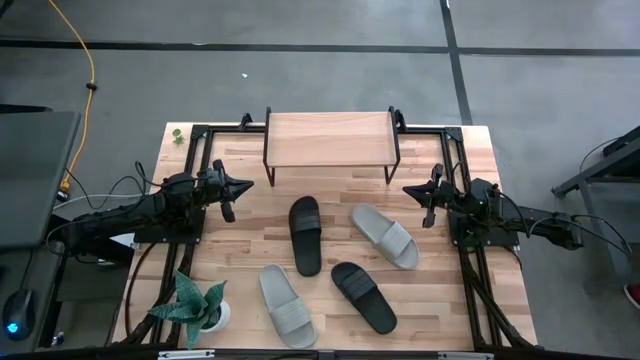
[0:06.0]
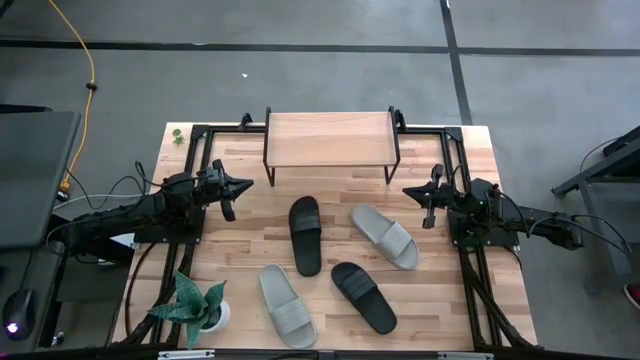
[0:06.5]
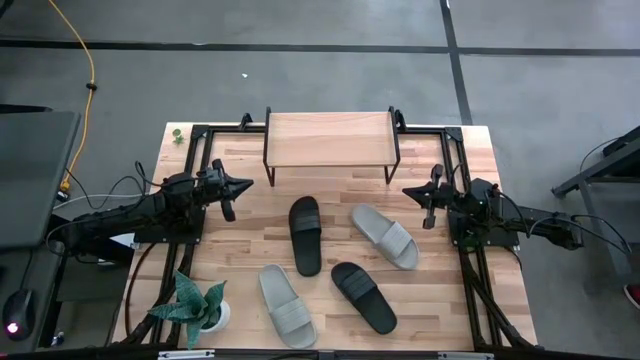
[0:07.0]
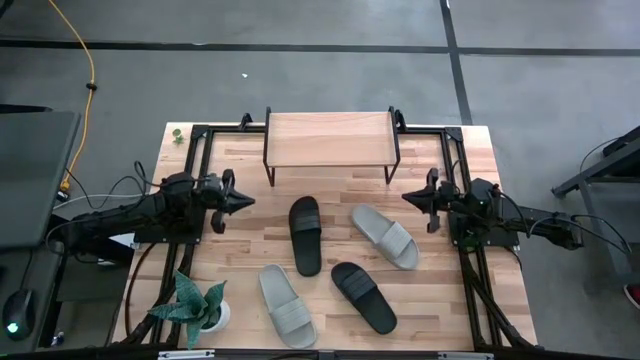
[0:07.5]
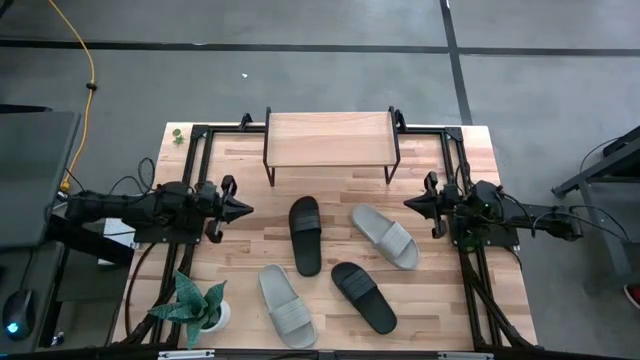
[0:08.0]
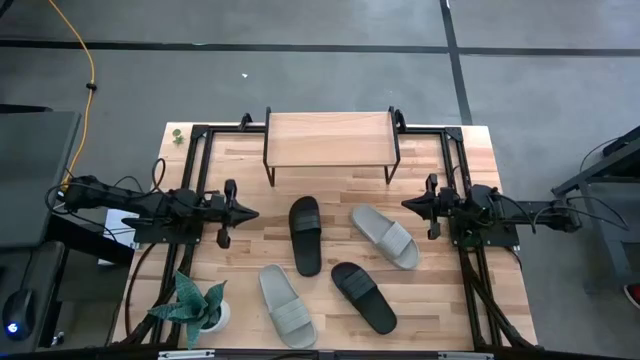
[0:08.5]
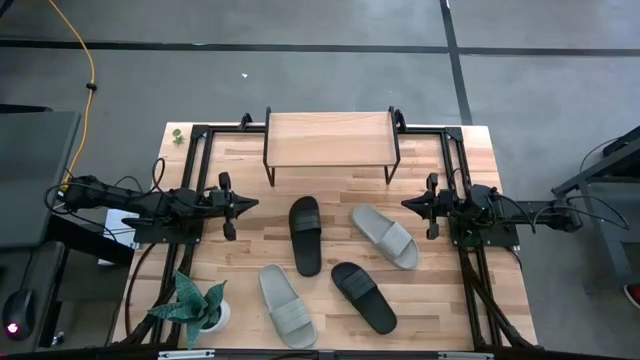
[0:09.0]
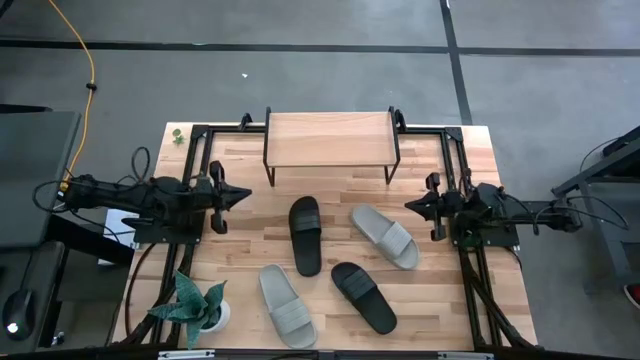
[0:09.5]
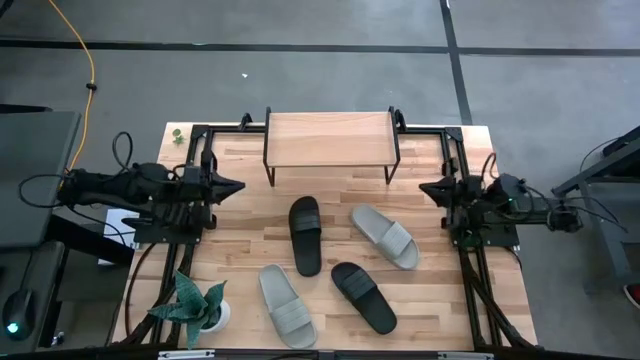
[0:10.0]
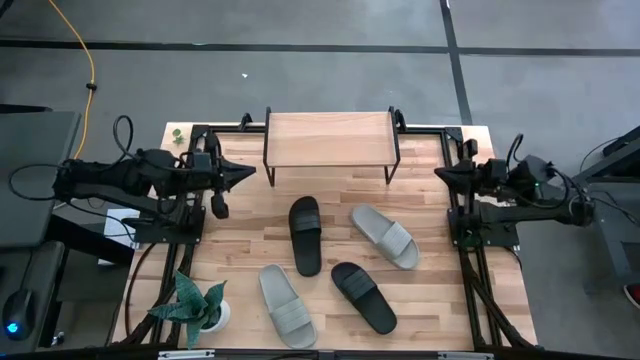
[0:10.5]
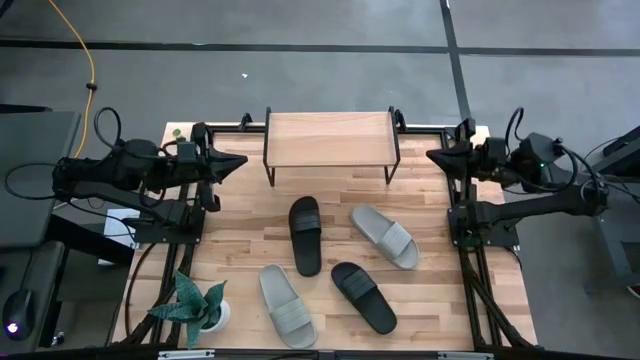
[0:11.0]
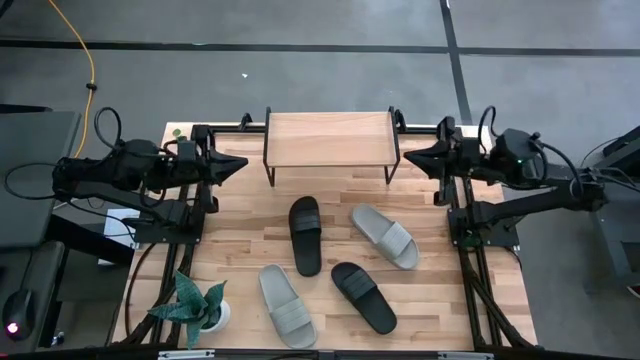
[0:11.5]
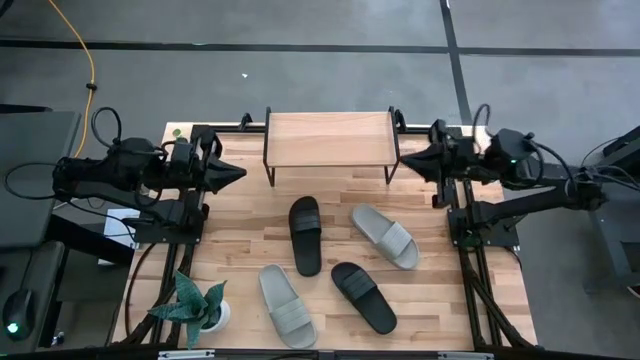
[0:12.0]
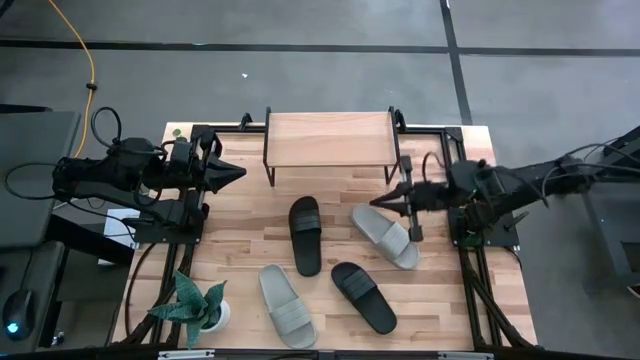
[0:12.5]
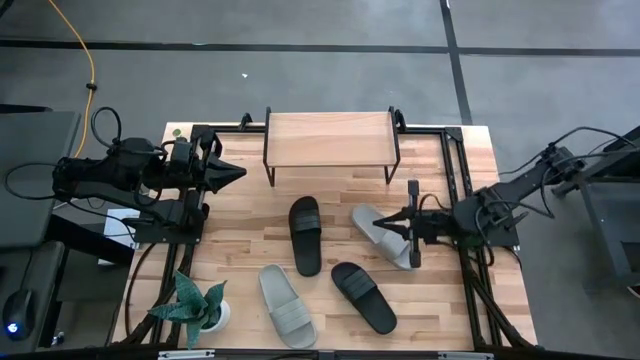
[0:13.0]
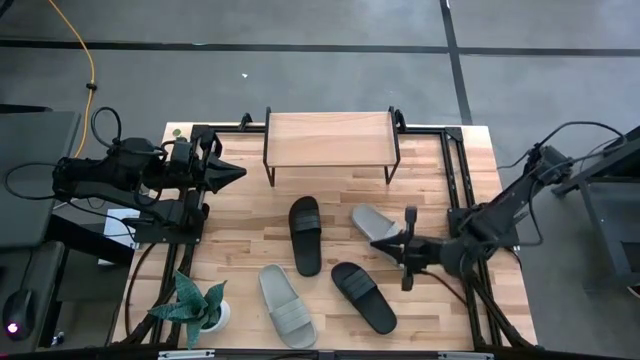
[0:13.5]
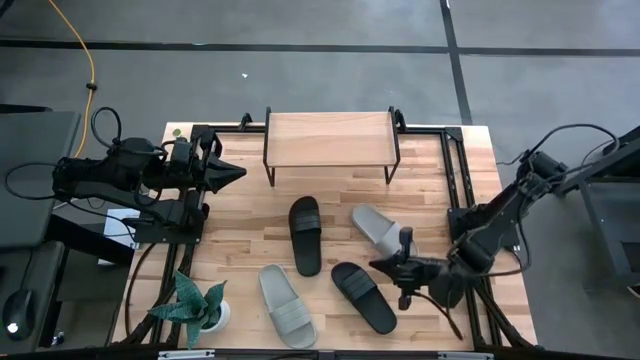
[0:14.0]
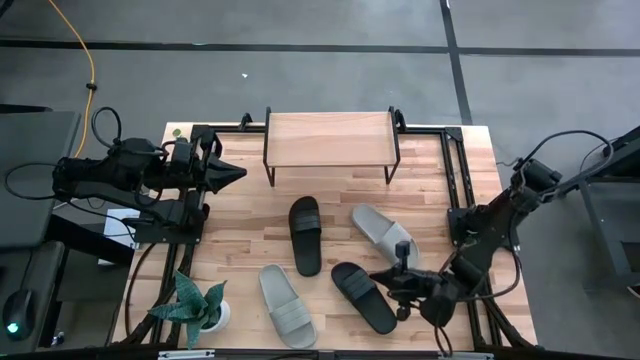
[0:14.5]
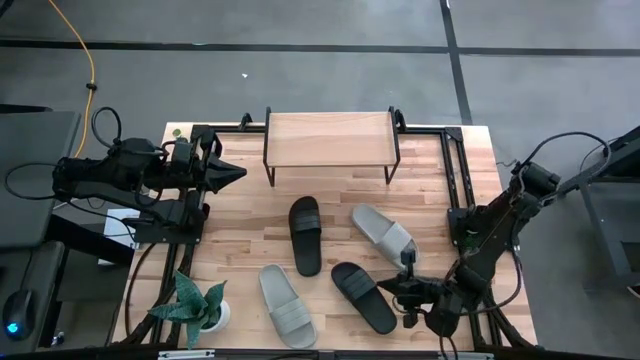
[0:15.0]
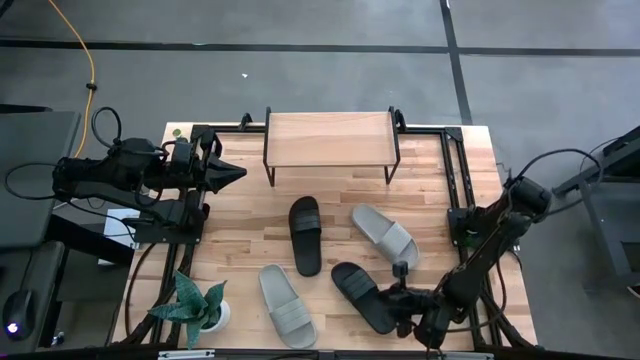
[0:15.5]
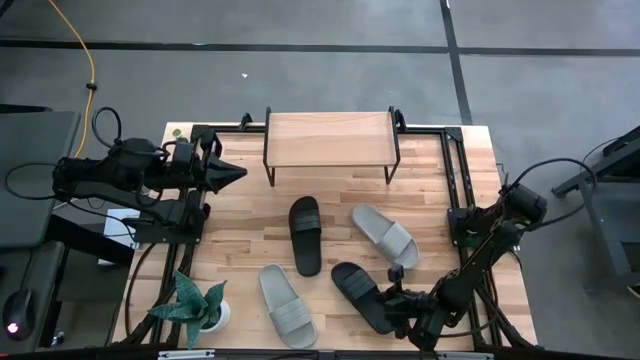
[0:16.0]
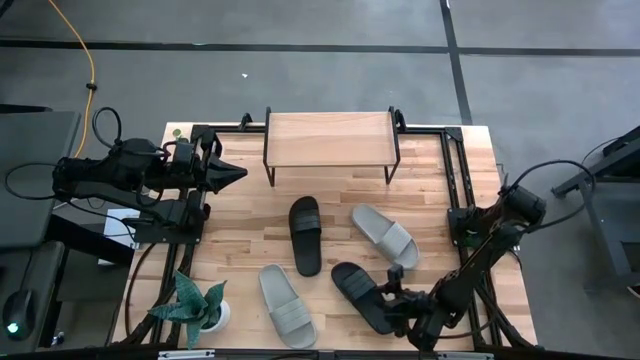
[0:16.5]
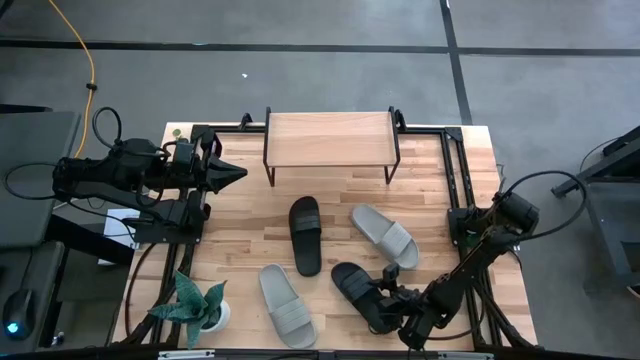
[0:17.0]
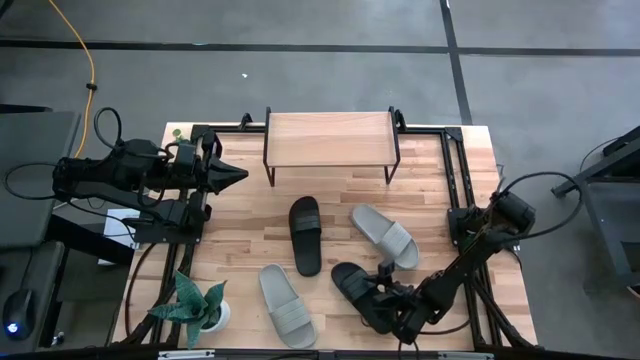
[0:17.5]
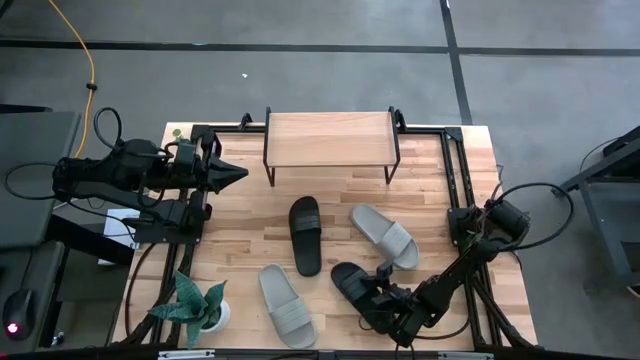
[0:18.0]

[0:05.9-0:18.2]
Task: Pick and place slides into the shelf
Put the bottom black slide on the shelf

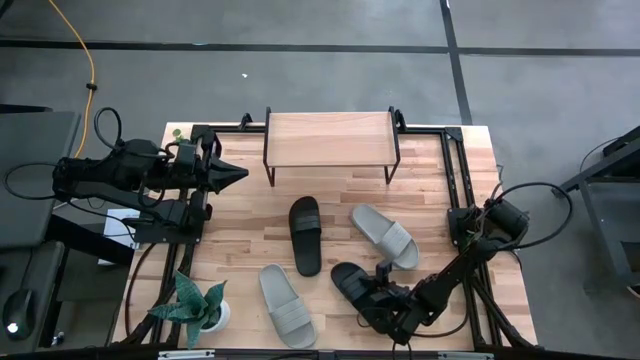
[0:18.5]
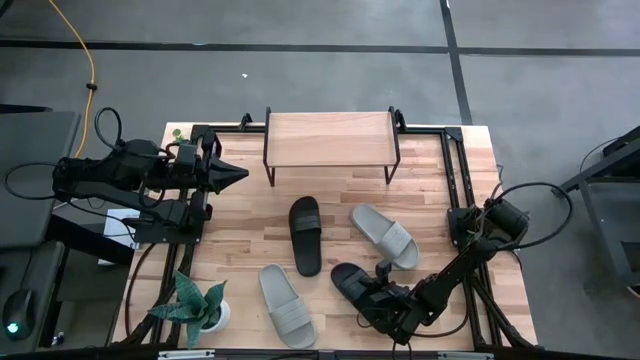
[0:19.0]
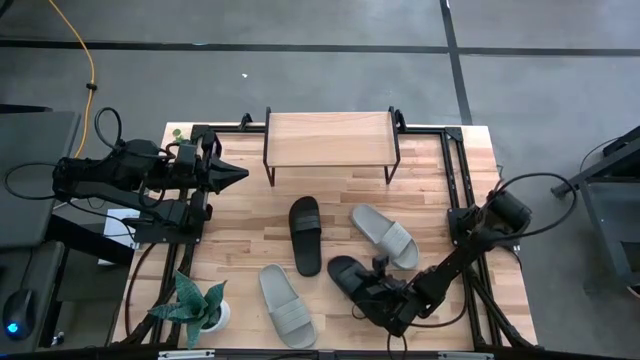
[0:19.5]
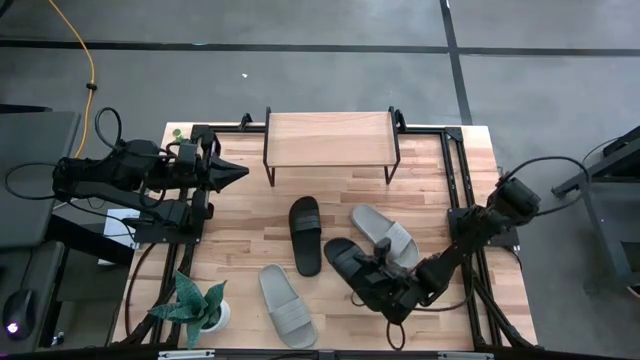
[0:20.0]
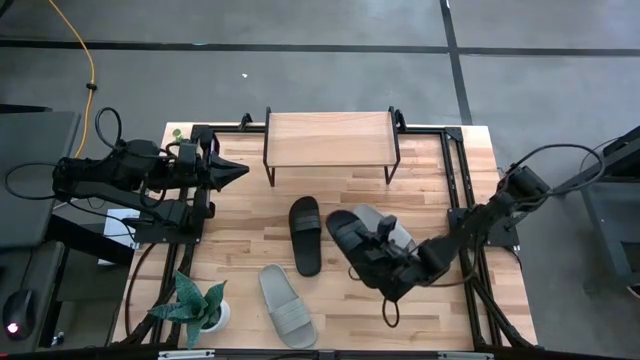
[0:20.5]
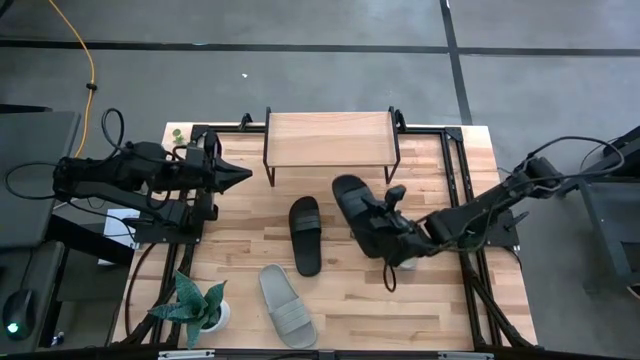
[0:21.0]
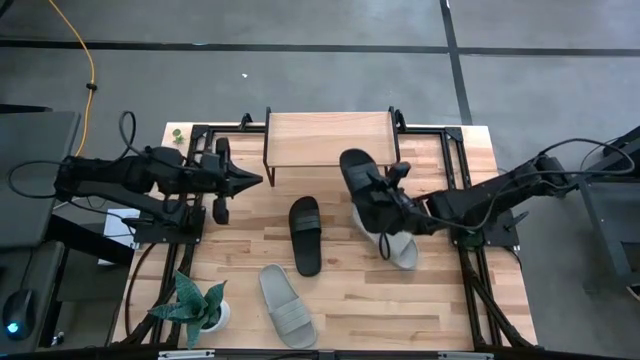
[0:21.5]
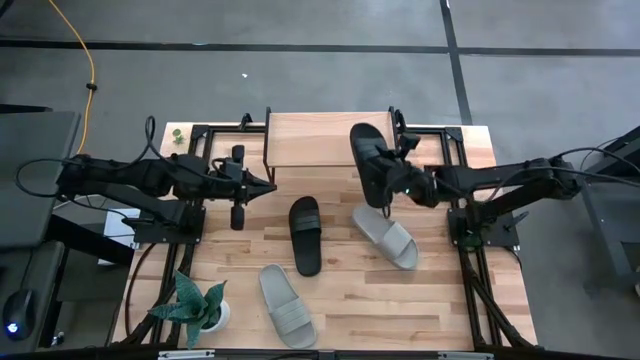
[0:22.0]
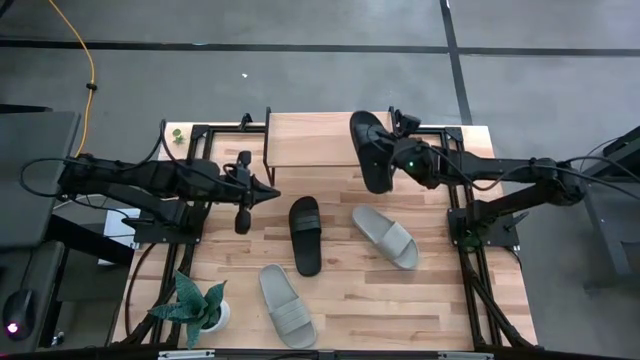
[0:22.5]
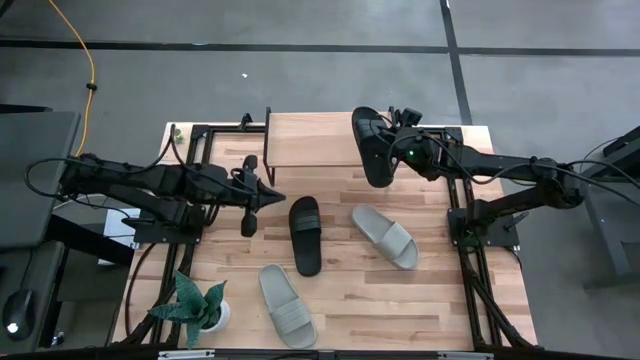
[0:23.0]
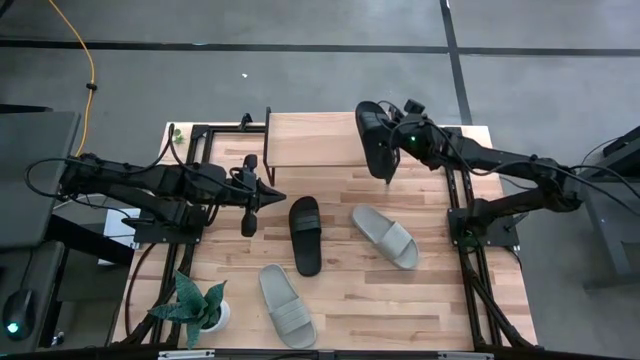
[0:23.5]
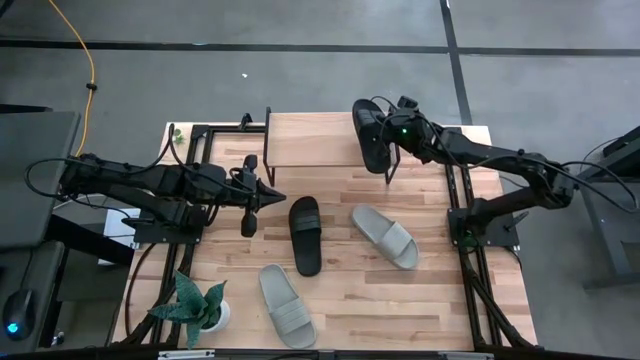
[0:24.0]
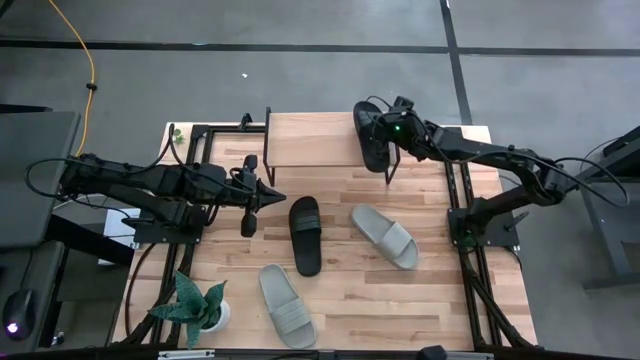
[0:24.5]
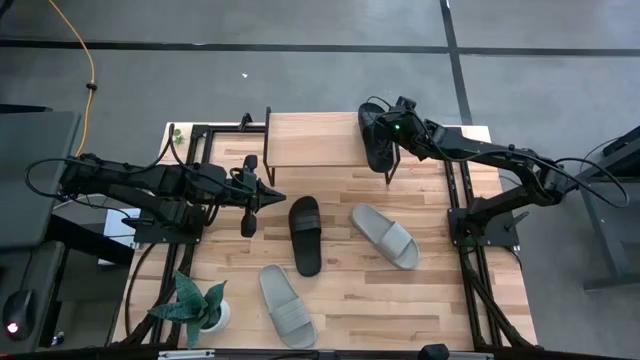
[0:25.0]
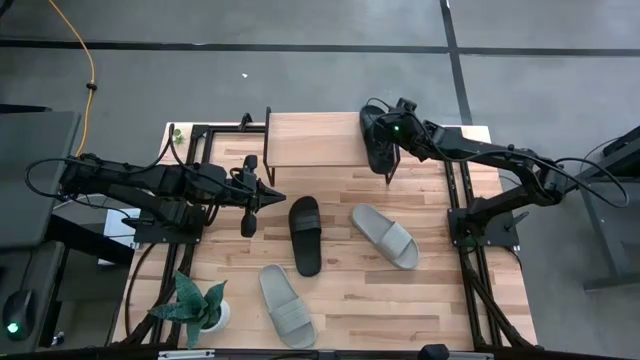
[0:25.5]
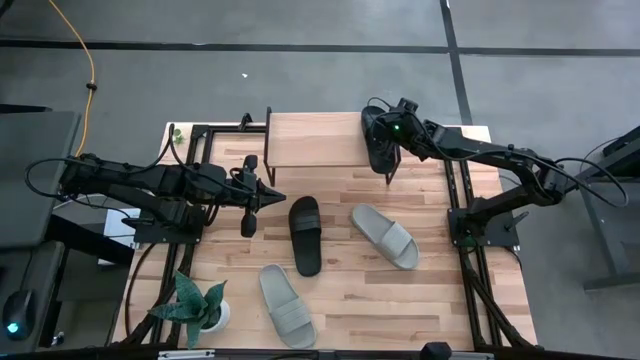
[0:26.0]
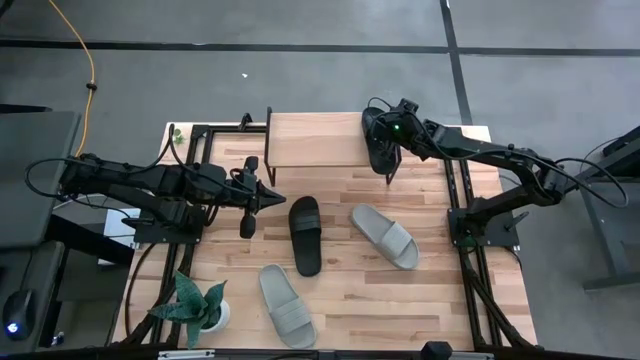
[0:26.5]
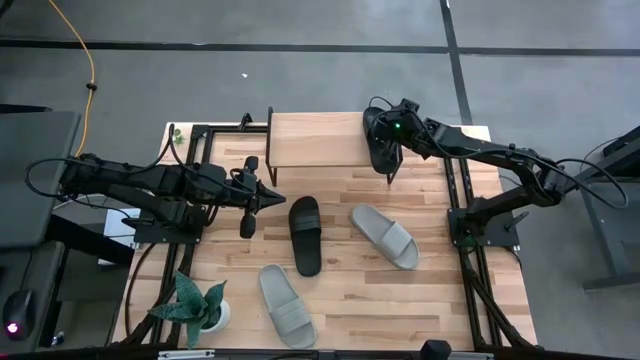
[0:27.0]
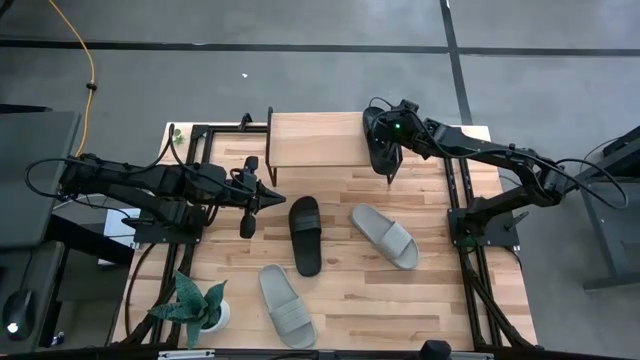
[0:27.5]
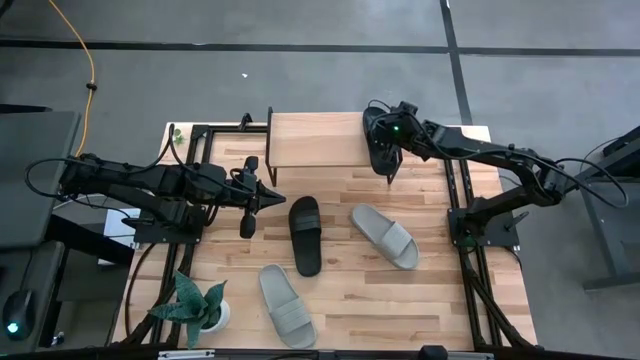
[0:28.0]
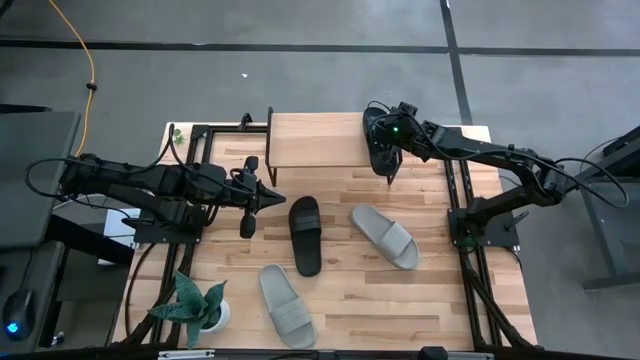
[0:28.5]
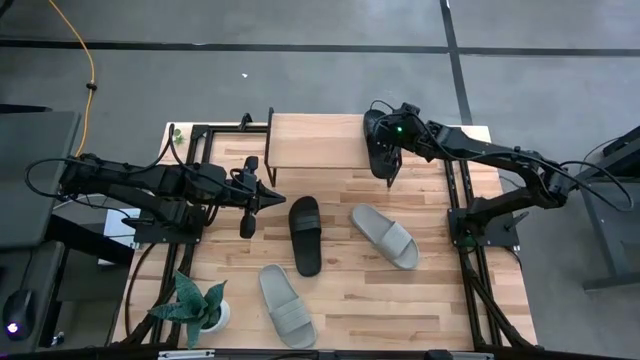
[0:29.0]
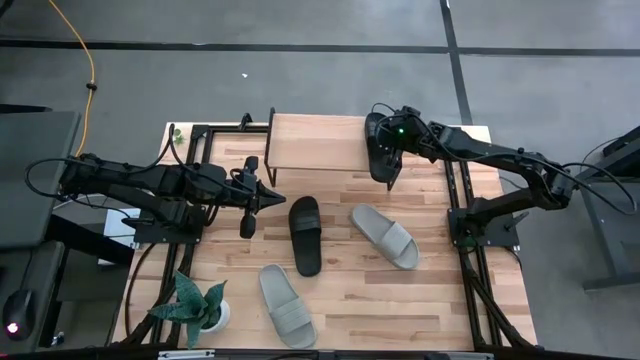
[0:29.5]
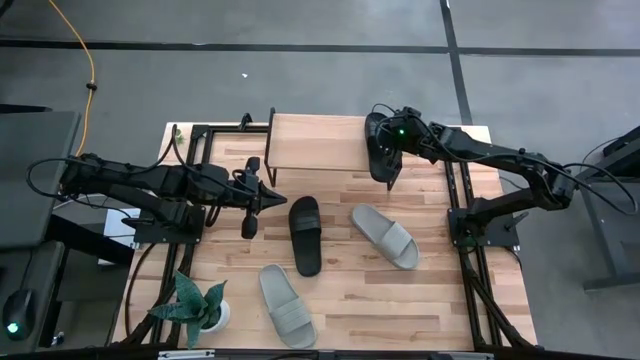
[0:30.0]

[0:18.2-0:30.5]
Put the bottom black slide on the shelf
